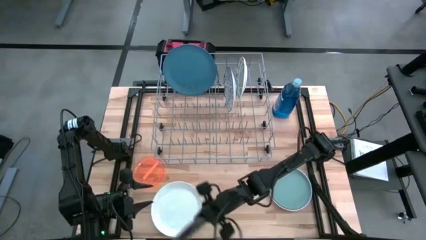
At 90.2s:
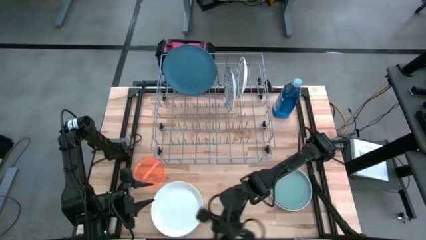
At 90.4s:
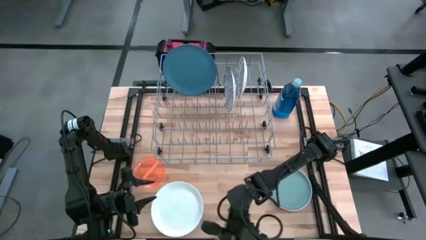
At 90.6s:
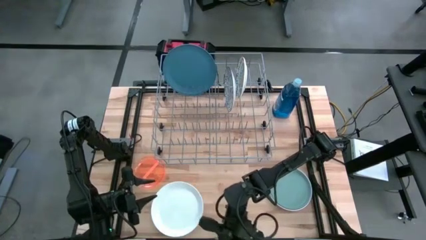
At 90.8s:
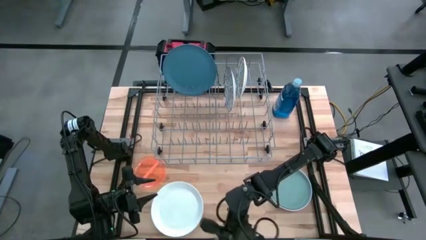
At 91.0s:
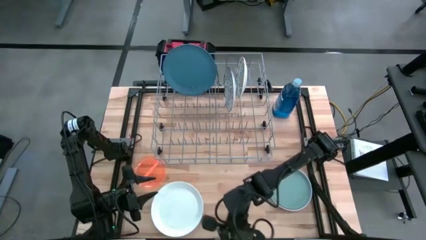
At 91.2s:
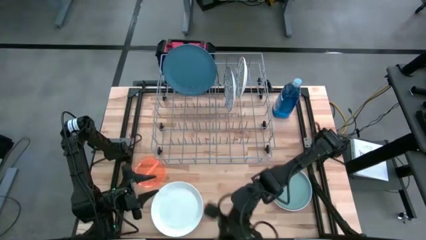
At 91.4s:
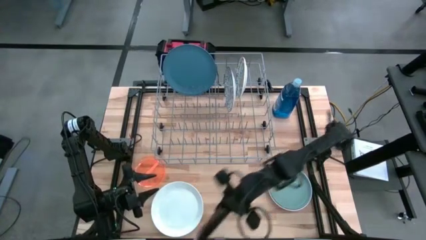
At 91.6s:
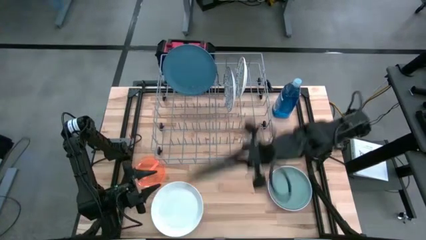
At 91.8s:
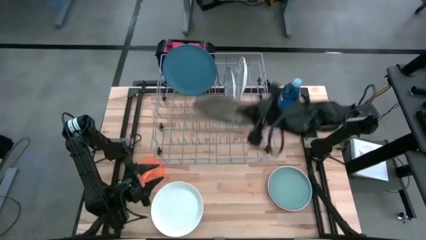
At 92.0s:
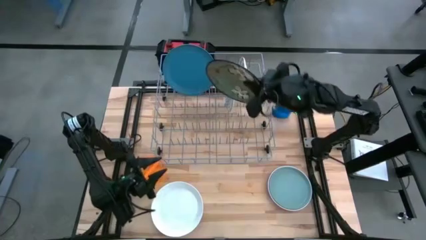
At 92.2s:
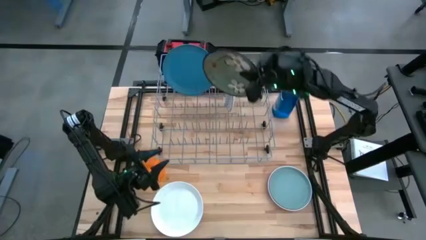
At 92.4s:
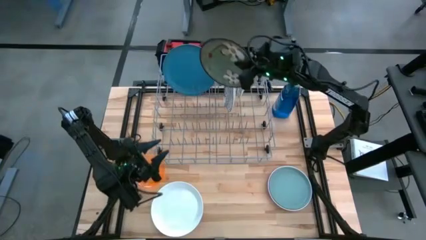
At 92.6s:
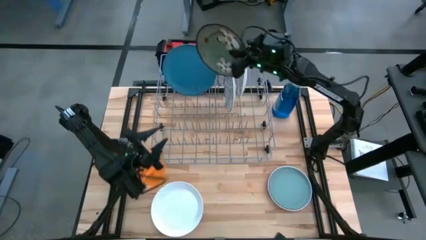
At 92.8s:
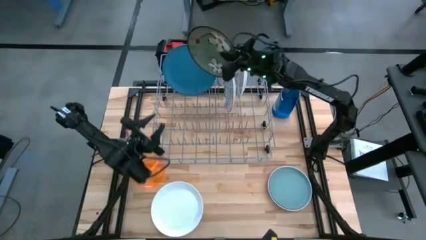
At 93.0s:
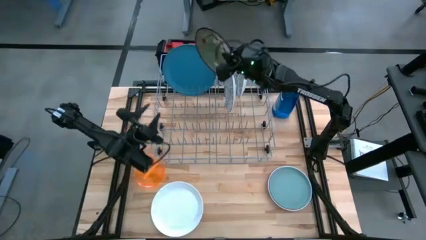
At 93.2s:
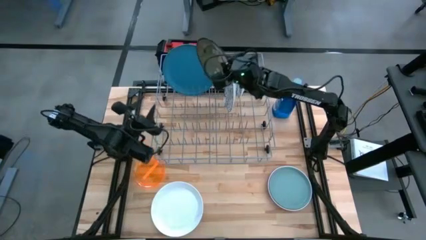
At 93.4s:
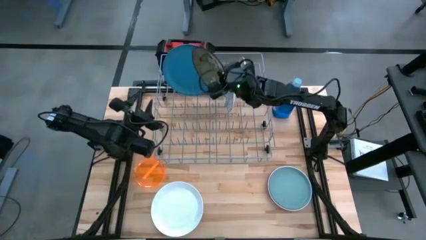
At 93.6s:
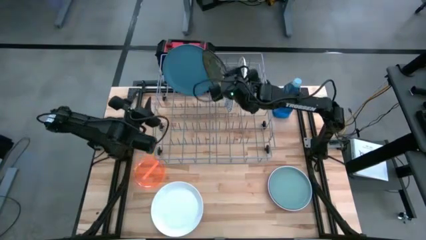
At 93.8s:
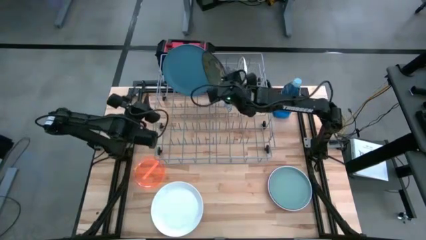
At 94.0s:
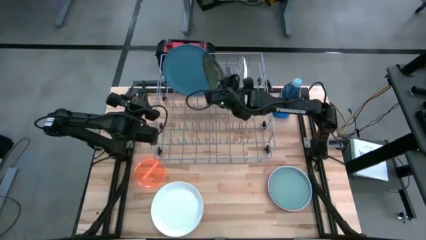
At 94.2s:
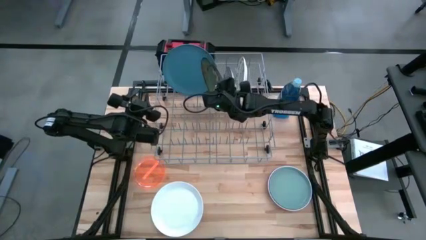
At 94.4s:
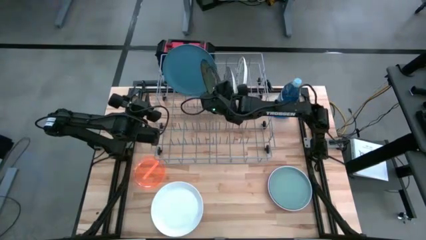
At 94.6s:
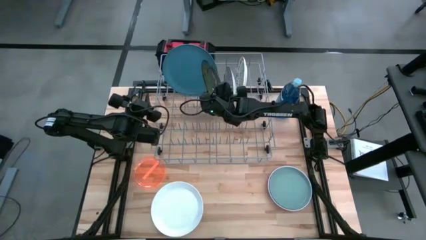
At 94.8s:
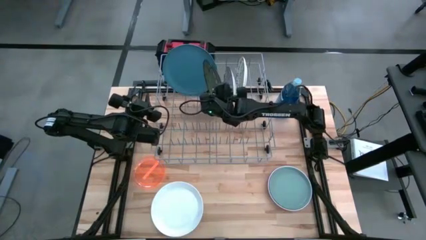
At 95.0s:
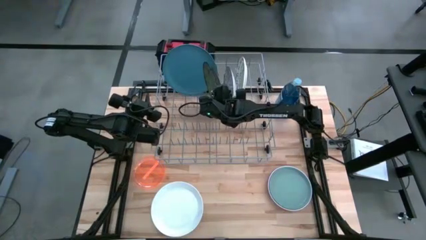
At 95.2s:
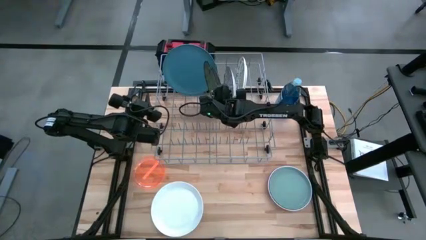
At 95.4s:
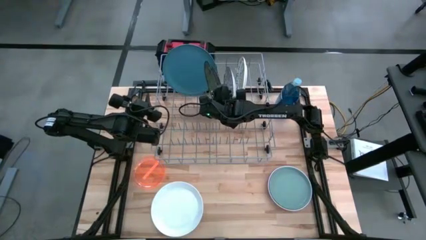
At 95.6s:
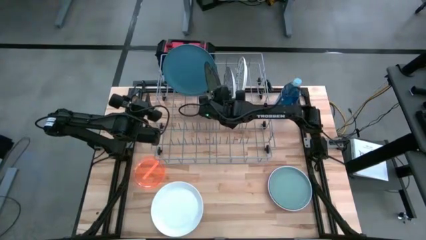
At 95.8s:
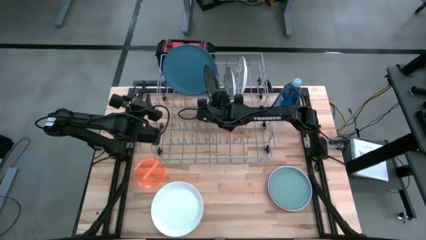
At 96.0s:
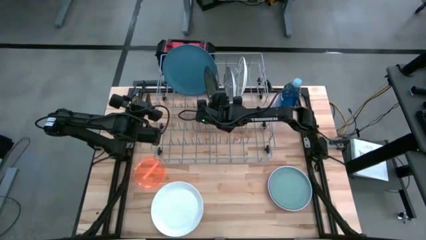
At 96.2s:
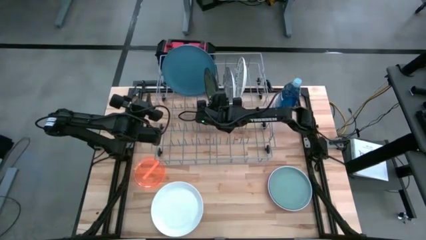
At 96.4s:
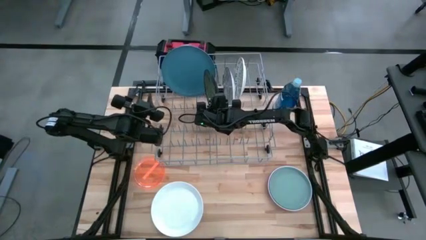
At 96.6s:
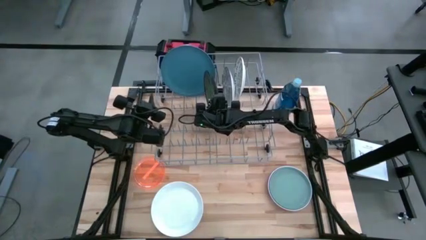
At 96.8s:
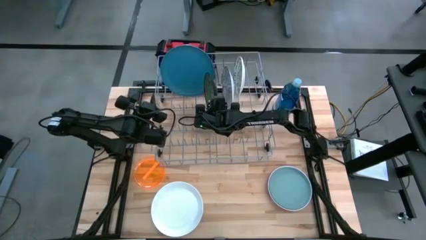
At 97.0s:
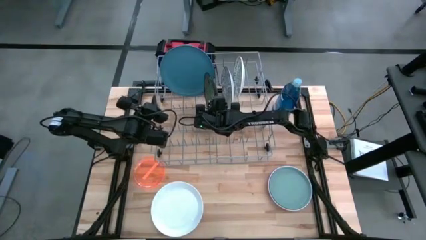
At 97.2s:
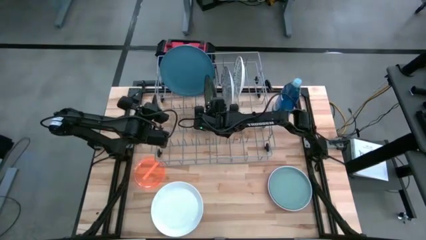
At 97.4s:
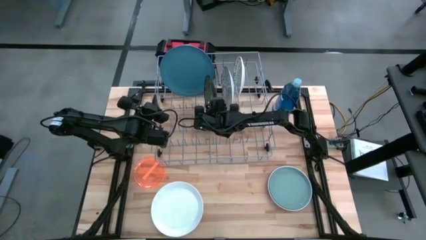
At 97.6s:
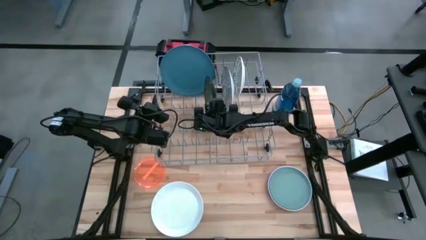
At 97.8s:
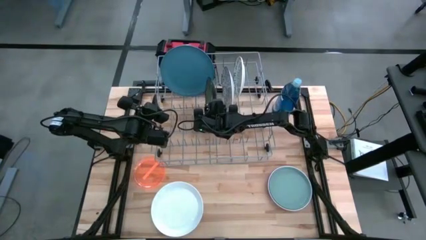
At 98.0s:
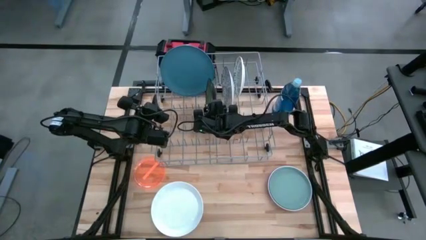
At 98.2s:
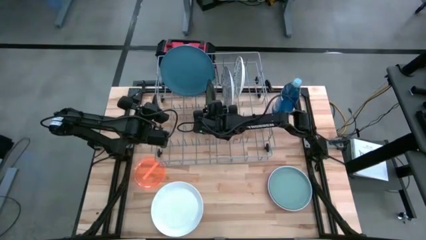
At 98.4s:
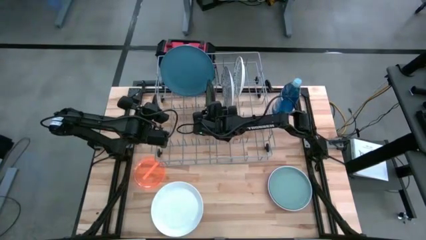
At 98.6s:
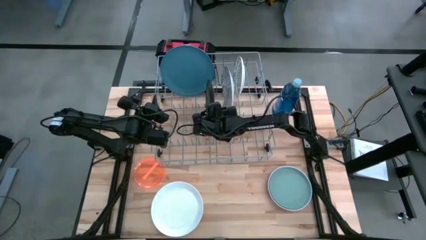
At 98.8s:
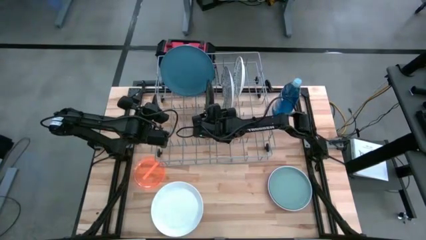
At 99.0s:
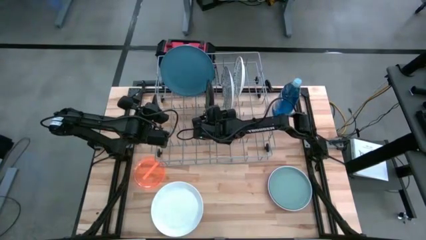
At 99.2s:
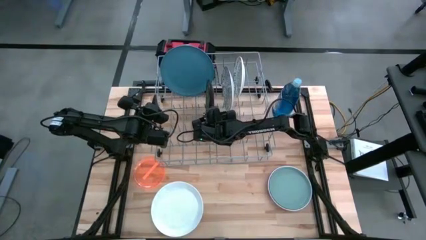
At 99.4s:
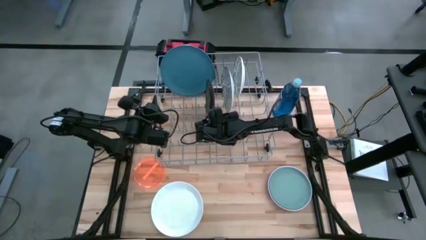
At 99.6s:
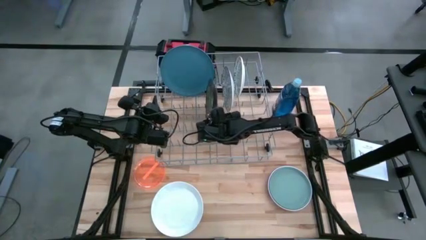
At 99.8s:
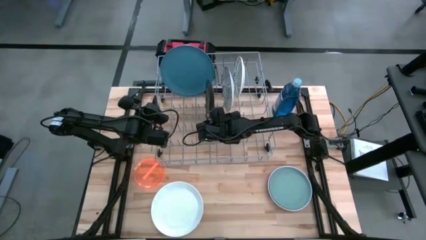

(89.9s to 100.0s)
Task: Sort dishes
Put the green plate in the dish rack

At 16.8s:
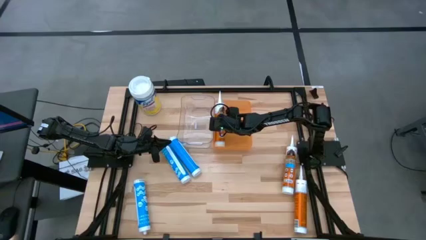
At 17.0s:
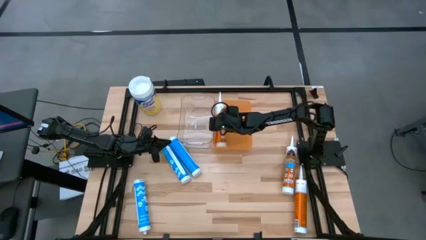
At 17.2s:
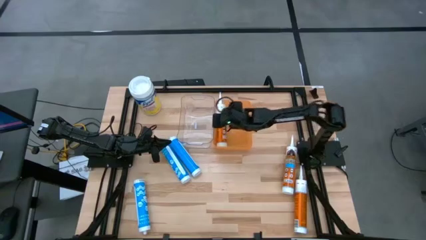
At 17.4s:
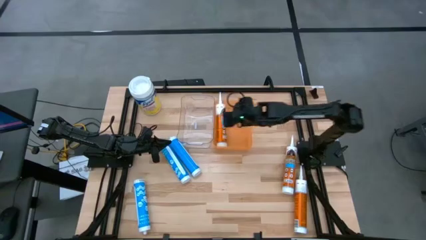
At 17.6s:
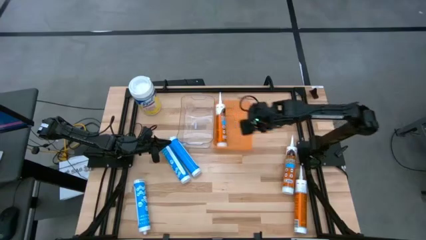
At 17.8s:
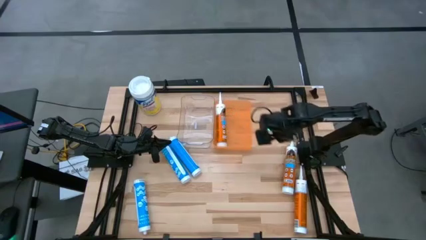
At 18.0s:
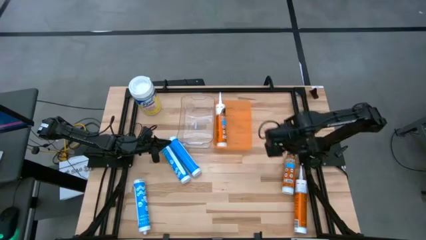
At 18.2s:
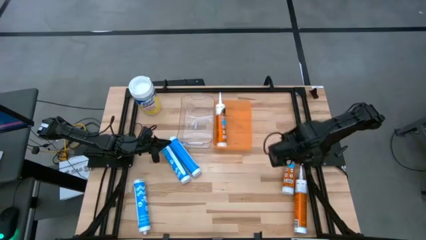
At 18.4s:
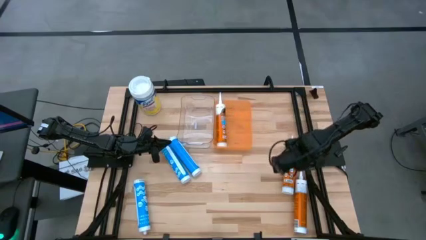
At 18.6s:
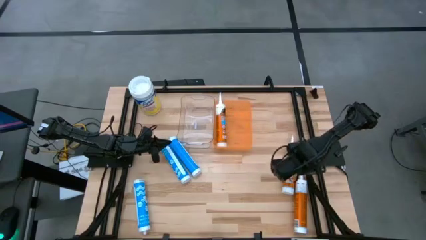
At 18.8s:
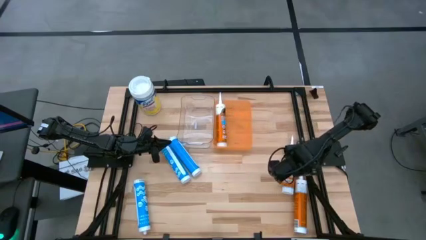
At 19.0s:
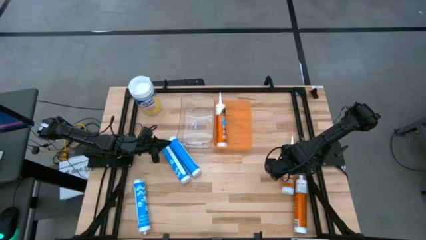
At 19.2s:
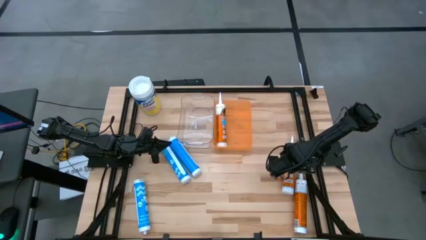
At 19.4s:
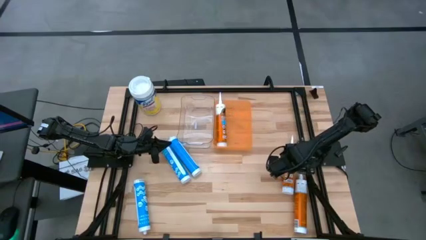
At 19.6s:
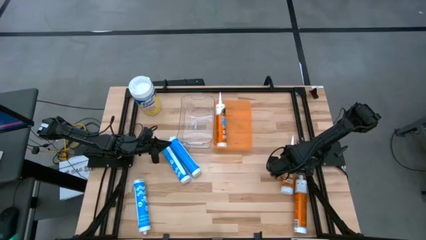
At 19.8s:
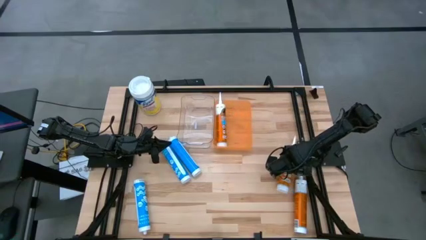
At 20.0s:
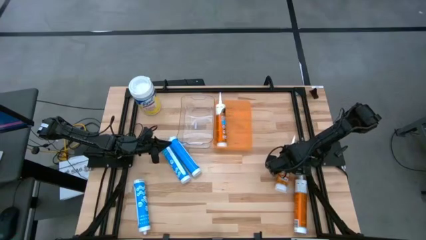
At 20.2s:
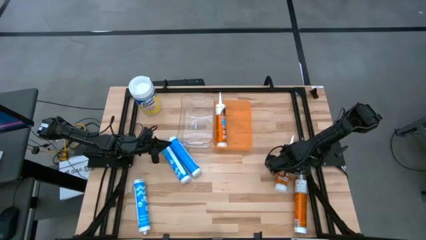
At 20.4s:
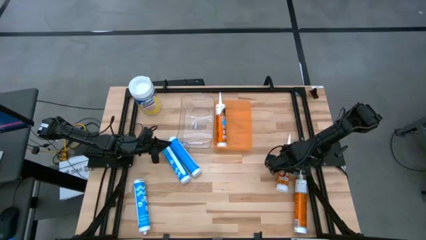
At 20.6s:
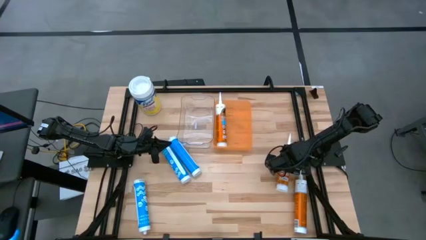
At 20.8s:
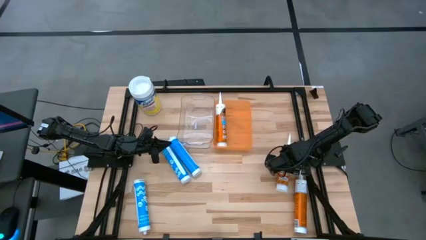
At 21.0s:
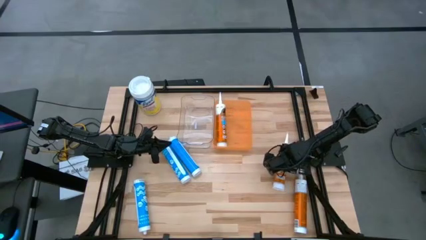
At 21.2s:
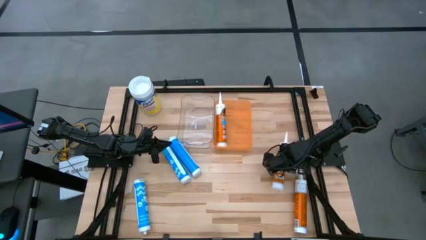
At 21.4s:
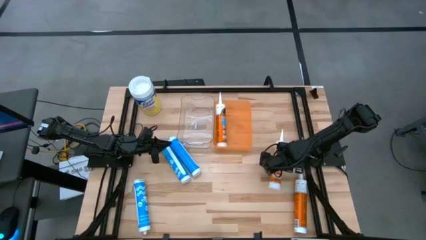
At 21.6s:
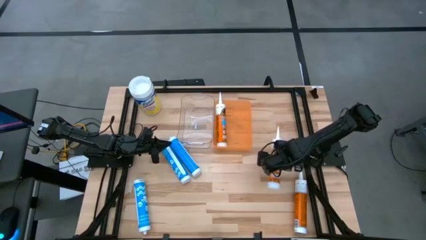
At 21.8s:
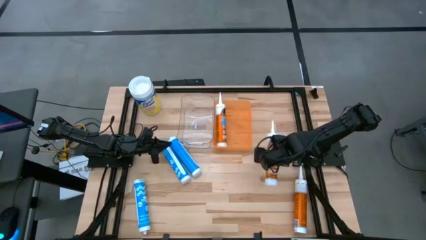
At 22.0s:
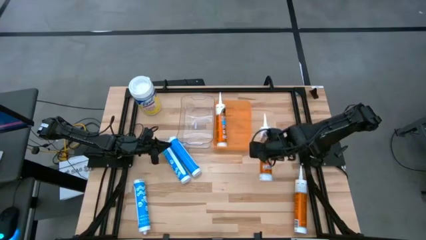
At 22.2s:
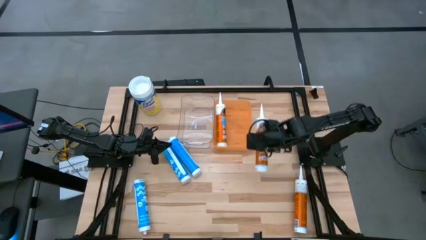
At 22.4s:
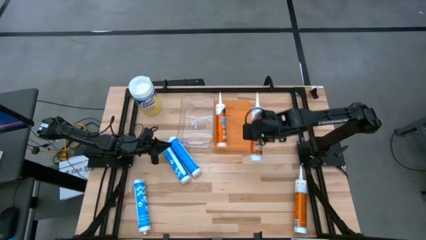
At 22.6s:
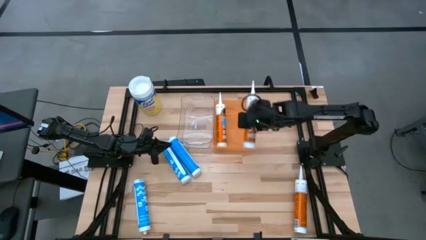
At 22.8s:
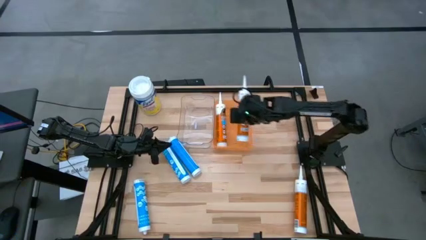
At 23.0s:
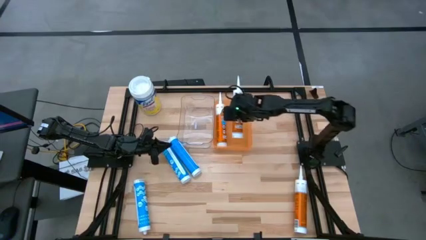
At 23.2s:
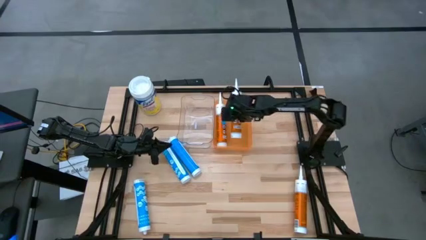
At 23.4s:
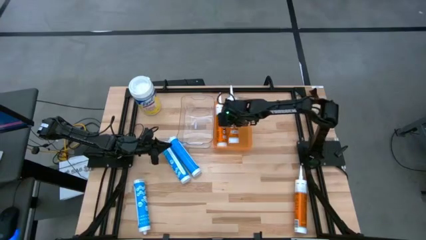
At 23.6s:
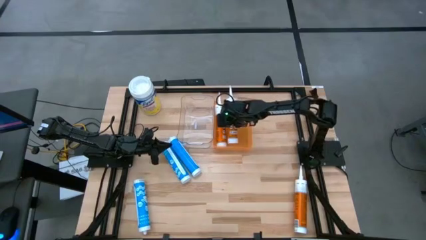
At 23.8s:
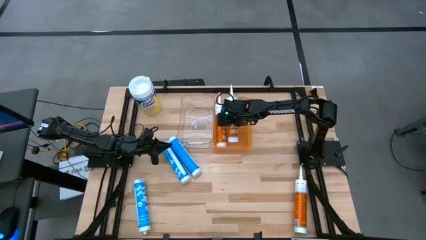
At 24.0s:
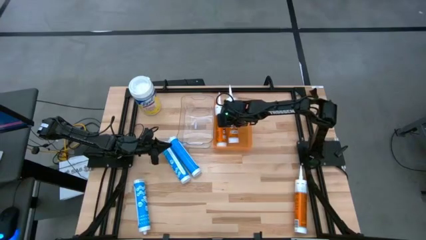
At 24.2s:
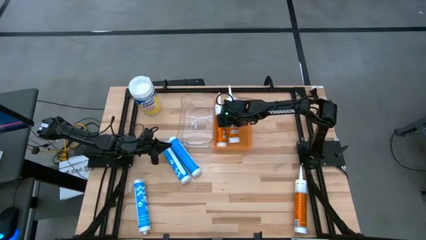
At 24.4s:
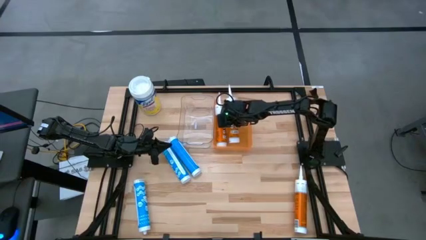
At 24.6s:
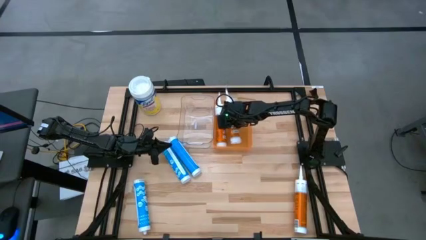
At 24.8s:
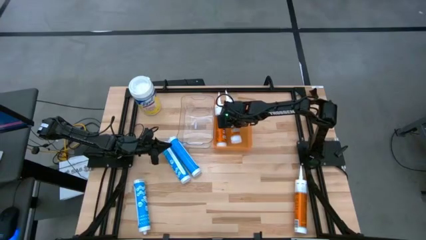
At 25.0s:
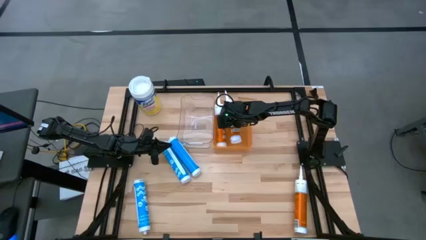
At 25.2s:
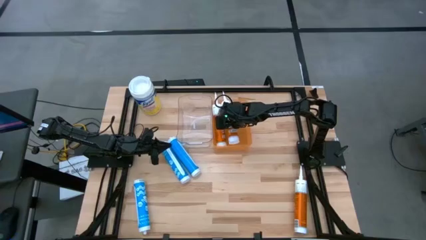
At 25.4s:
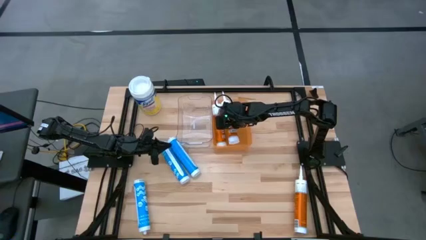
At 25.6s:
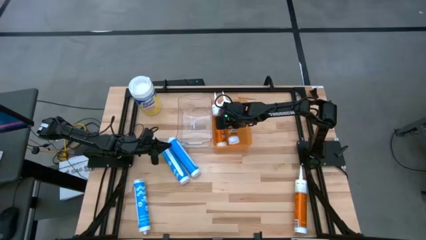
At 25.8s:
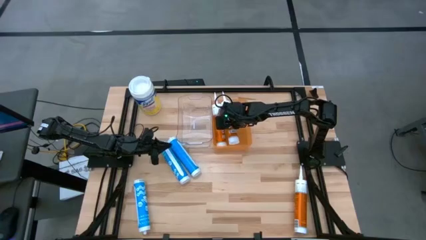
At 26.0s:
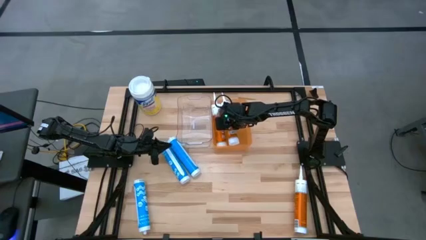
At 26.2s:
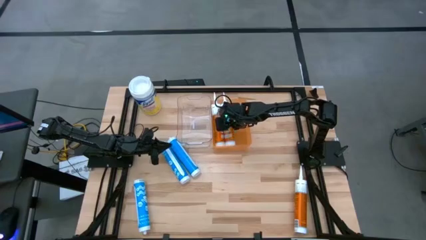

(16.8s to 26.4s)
Task: Pick & place silicon tubes, Sealant and Lysol wipes
Put the top orange sealant into the orange bin
